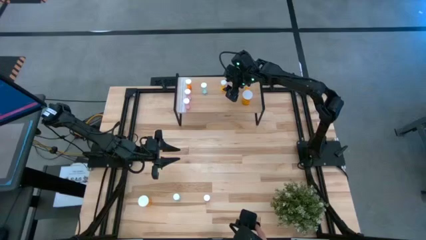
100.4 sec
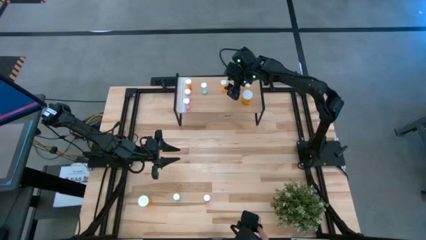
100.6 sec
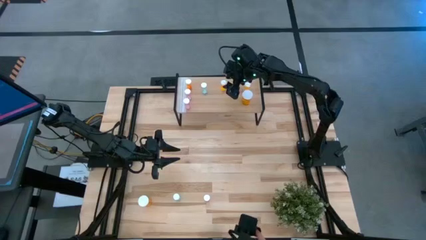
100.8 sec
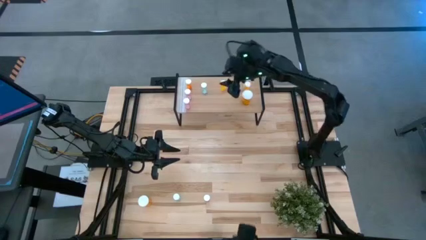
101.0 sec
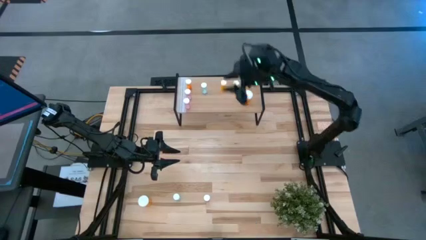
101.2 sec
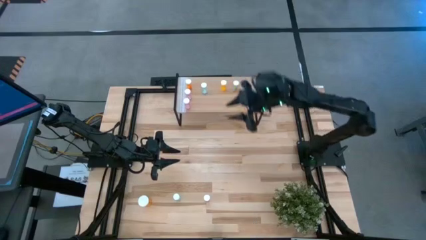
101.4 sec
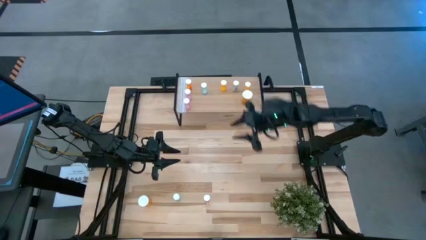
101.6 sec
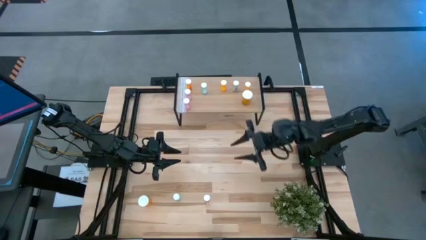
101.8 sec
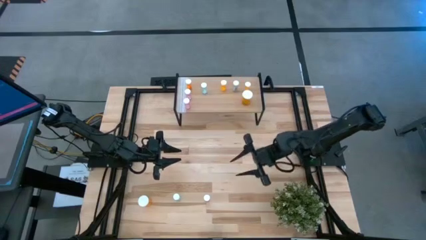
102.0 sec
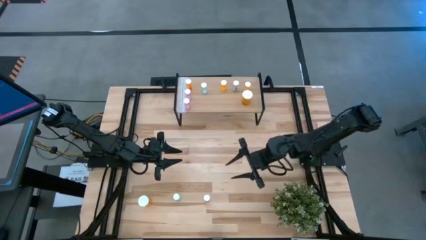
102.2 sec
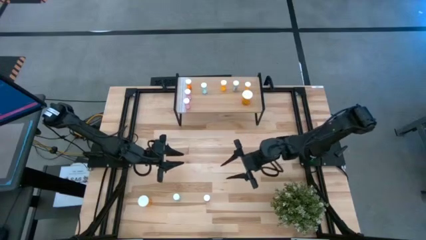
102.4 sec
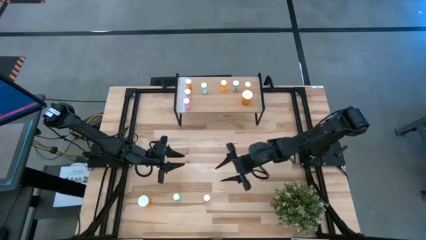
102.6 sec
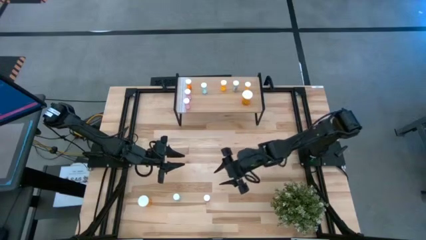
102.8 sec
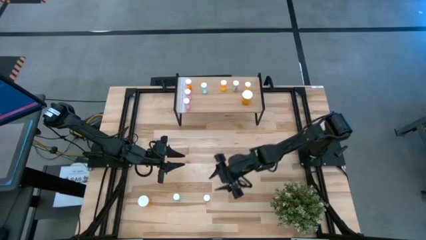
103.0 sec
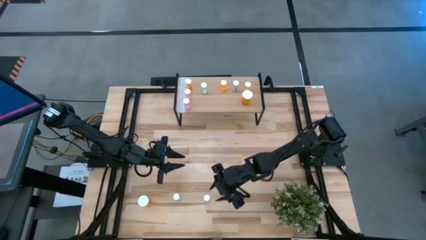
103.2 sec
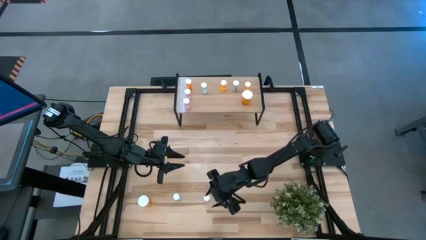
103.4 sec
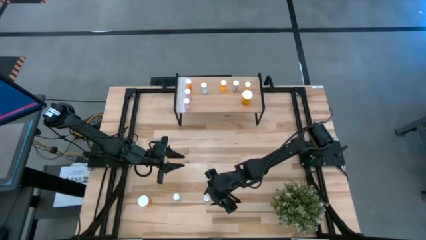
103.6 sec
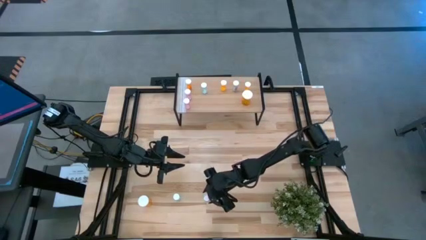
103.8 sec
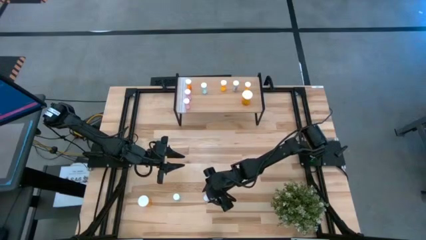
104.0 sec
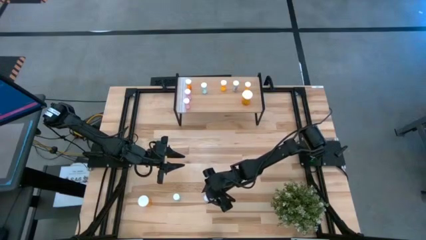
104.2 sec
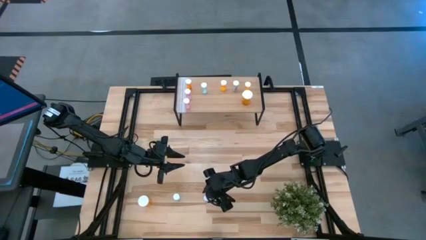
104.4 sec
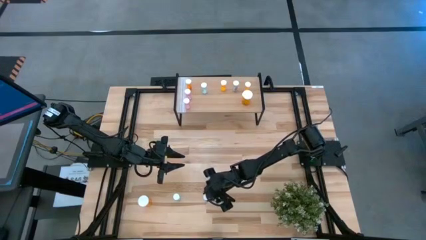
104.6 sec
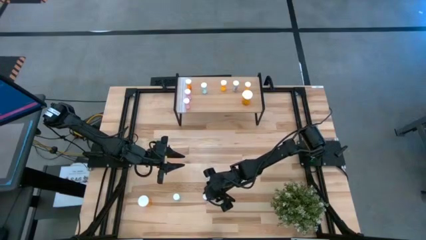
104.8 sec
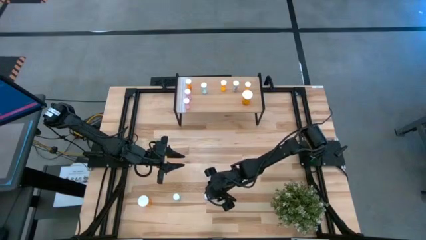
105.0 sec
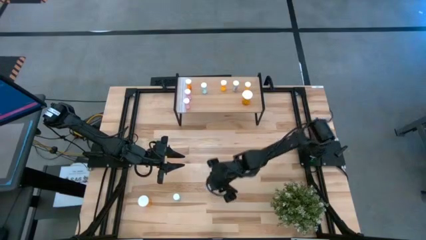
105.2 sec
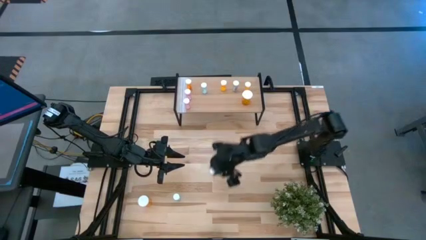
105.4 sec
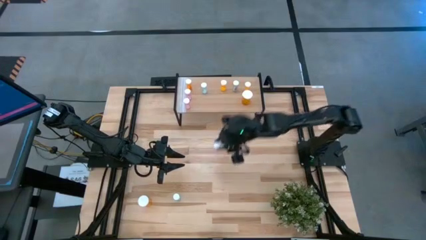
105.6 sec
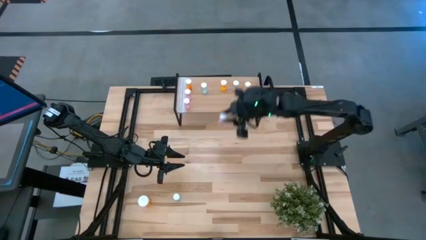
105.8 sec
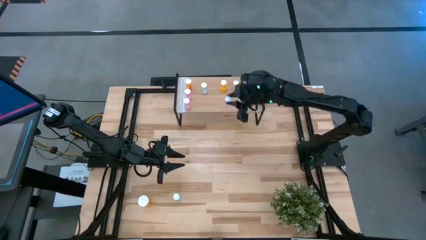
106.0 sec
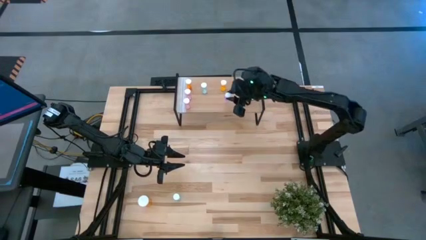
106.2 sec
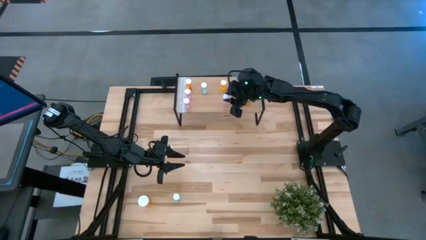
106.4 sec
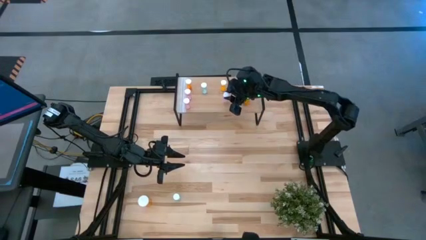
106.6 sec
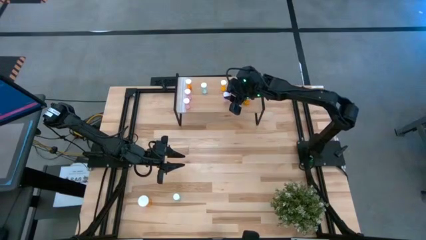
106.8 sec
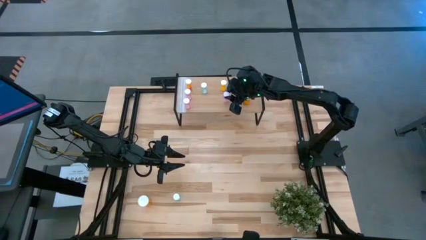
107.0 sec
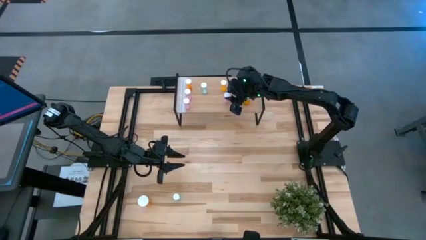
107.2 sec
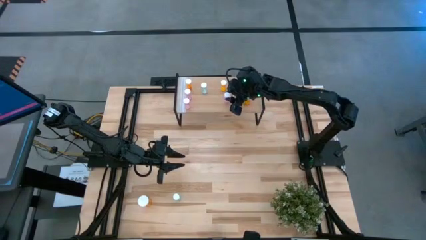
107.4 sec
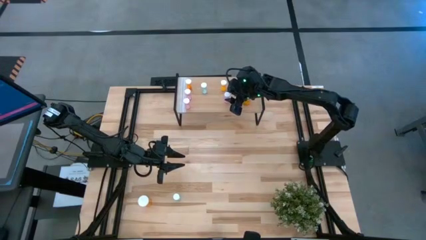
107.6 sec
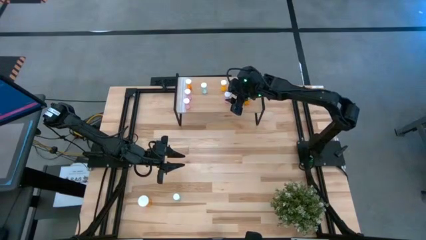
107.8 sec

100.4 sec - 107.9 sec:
Task: Pick and place medicine bottles onto shelf by color
Put the pink pill bottle on the shelf

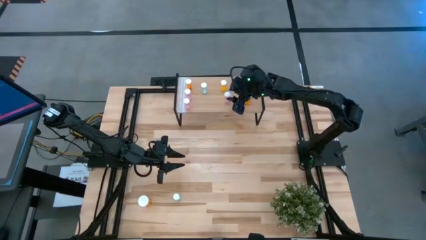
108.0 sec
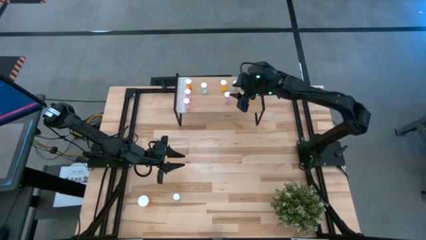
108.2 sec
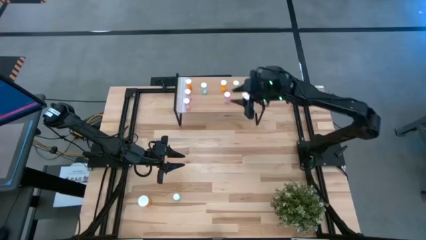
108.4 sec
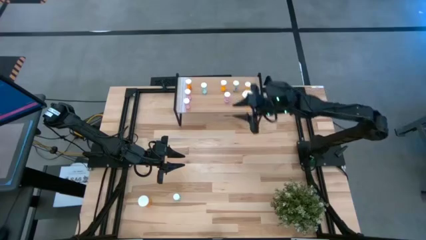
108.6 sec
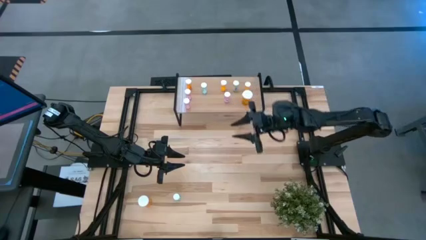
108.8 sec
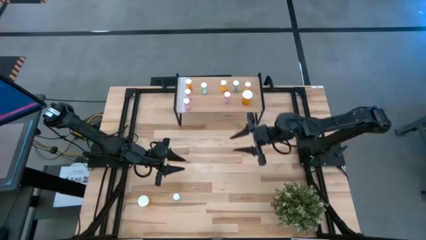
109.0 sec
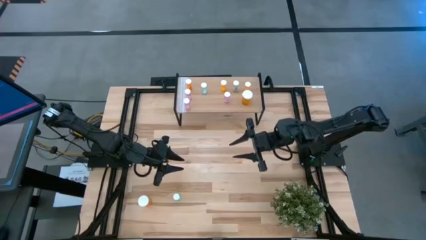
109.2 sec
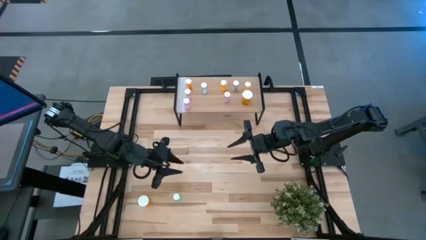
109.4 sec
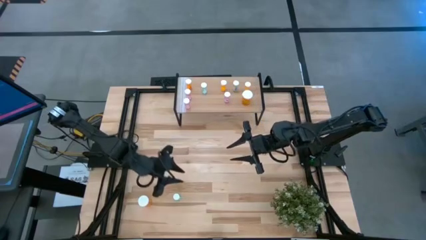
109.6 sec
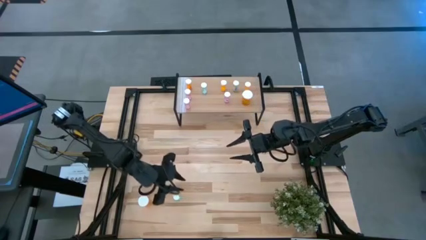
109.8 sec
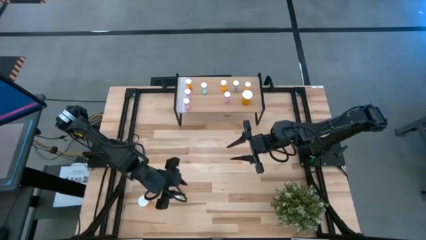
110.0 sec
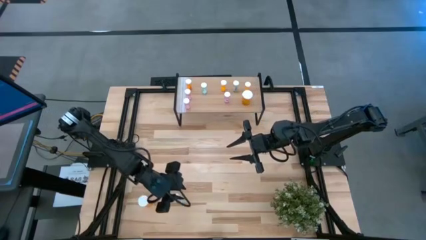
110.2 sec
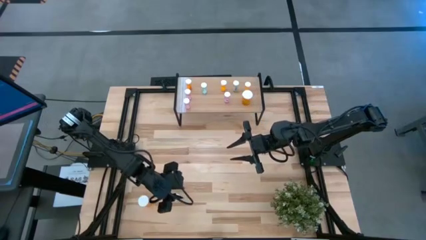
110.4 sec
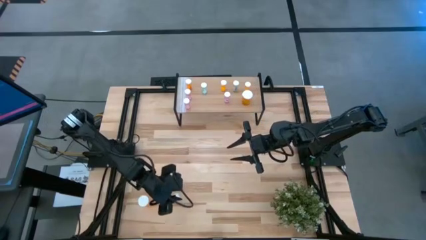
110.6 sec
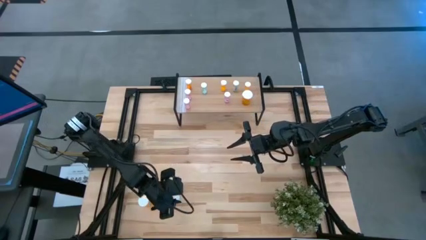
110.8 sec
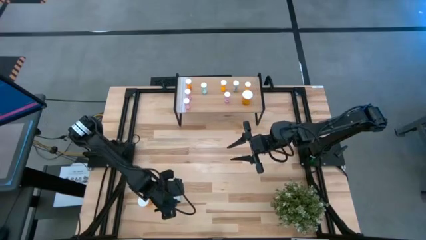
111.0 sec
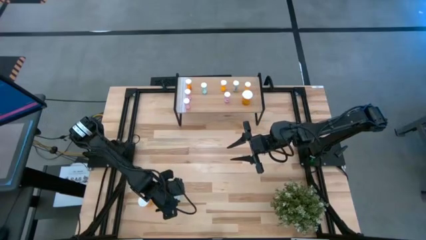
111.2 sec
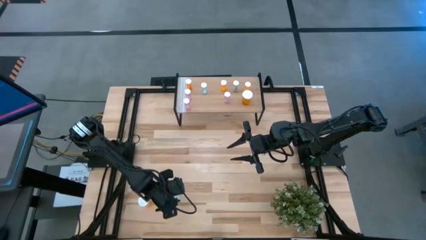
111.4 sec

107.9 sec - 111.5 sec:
Put the blue pill bottle on the shelf

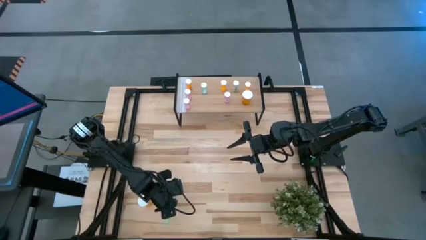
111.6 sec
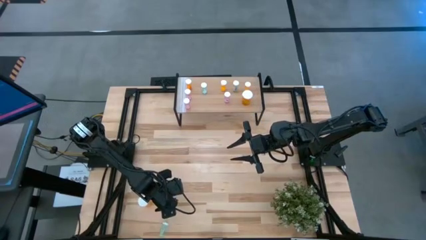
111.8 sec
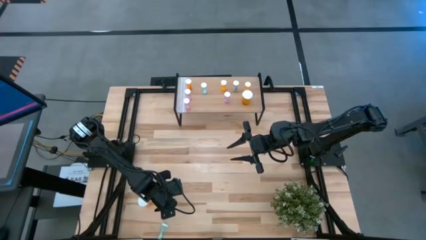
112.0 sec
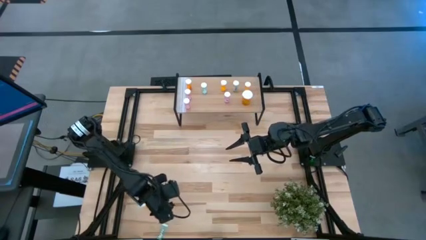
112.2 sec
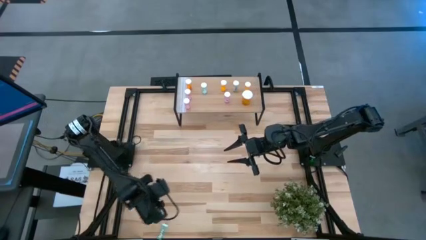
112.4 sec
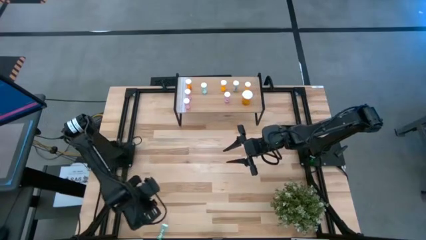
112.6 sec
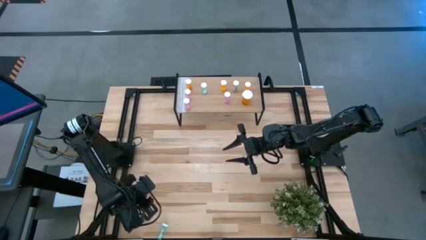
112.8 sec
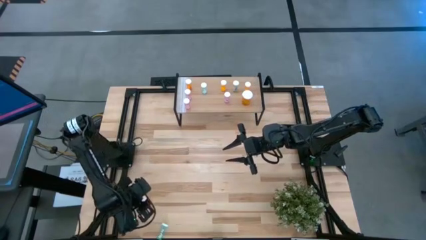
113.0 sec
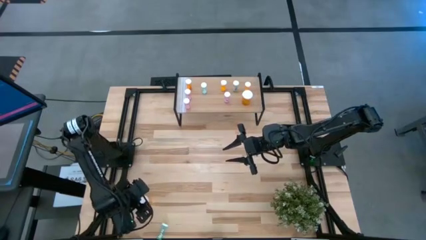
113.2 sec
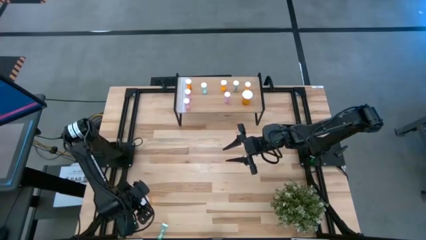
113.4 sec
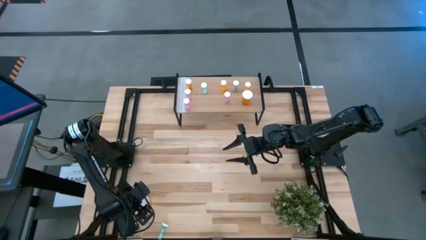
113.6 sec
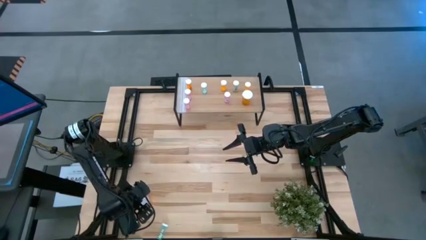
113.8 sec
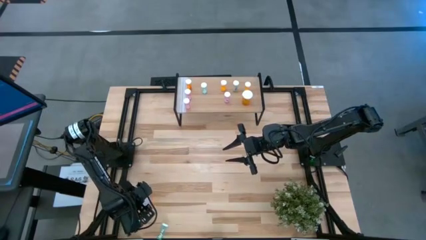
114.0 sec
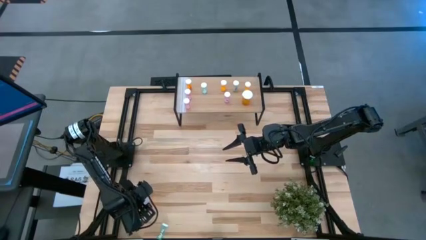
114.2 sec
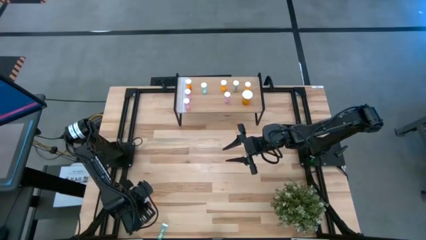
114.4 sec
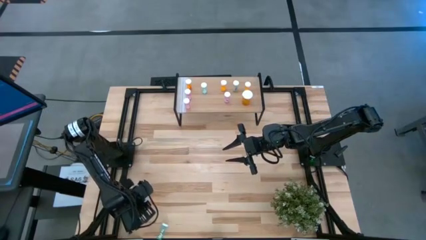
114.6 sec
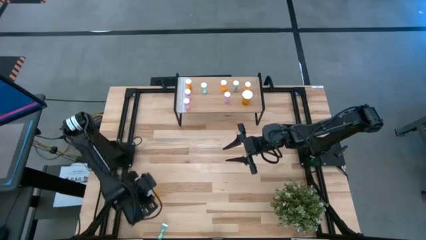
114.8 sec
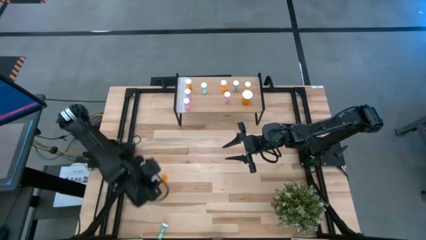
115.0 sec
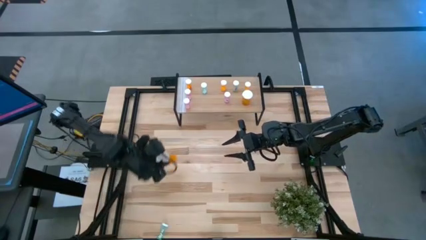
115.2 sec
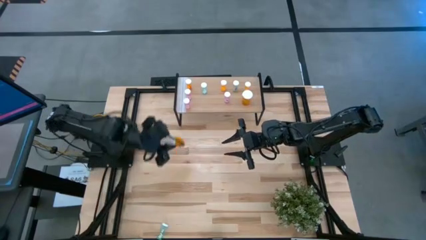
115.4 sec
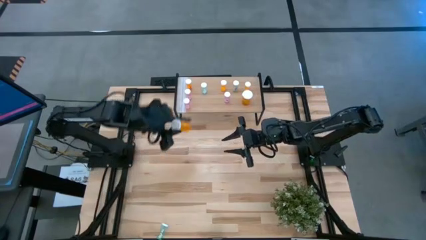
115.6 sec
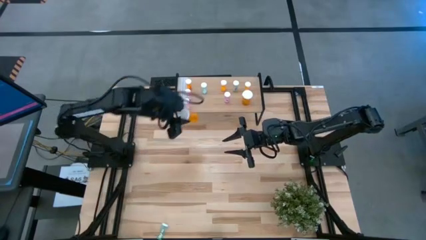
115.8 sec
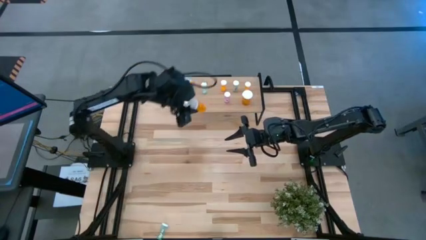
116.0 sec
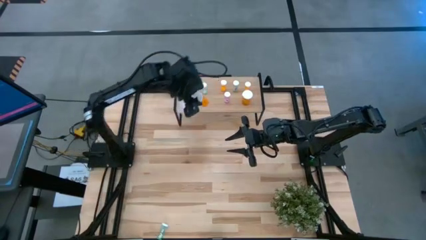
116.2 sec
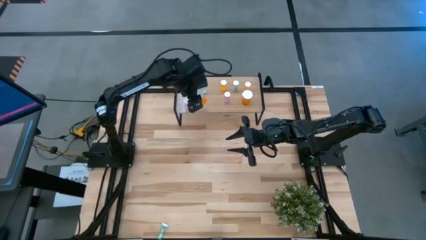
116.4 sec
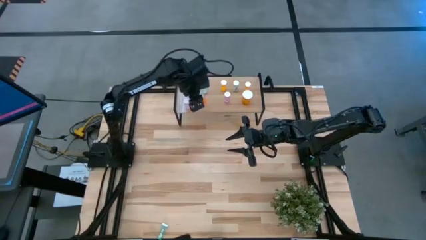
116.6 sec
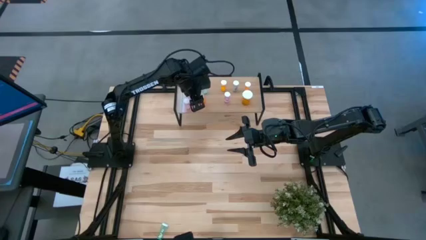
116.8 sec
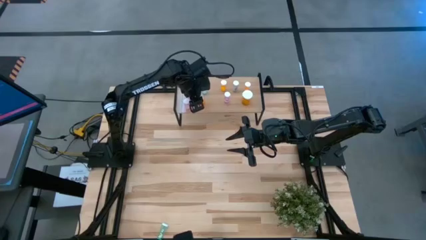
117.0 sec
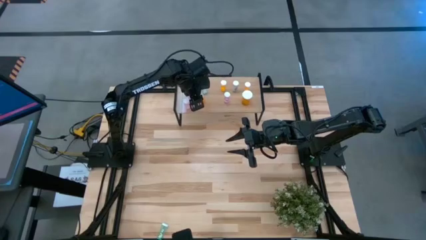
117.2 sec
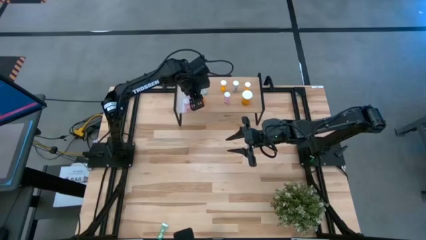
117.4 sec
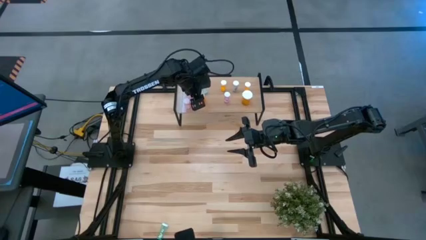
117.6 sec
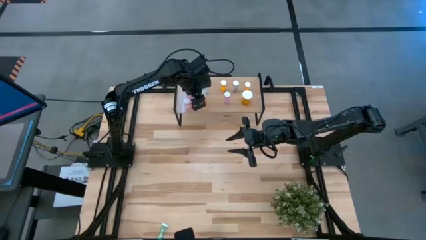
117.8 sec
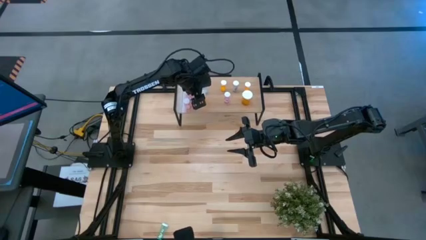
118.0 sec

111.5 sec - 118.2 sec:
Put the large orange pill bottle on the shelf
